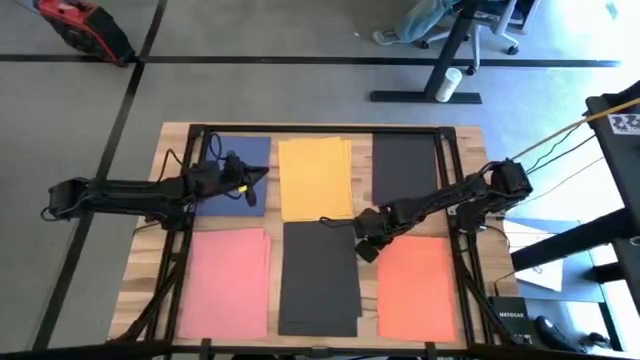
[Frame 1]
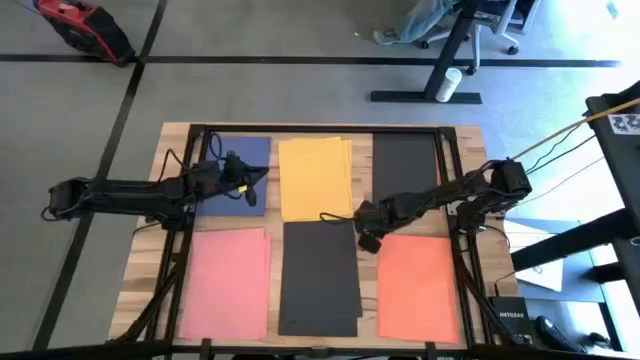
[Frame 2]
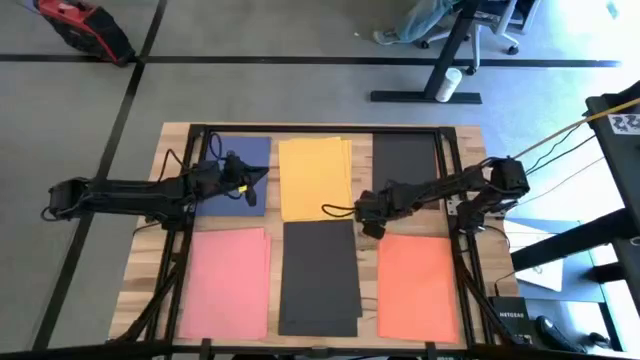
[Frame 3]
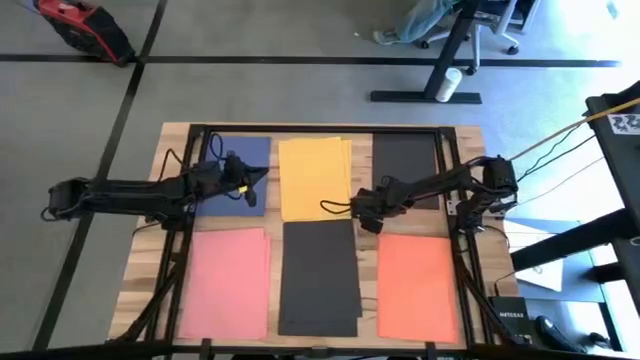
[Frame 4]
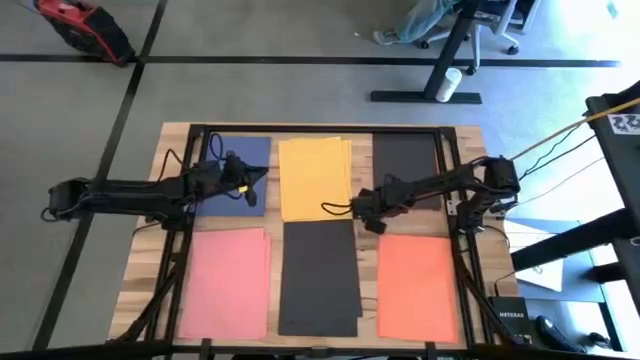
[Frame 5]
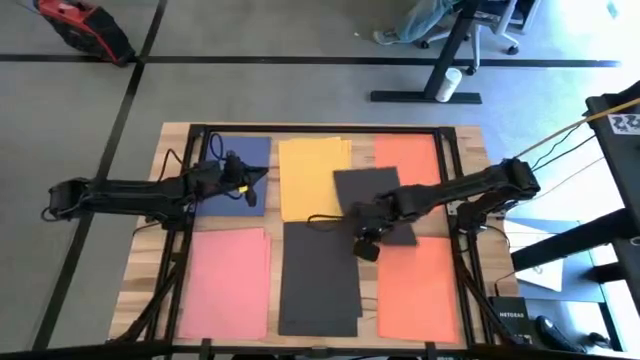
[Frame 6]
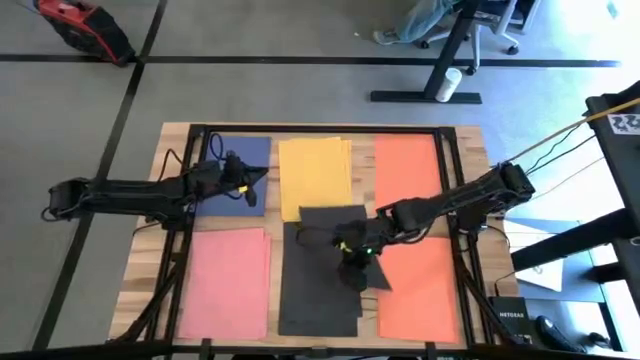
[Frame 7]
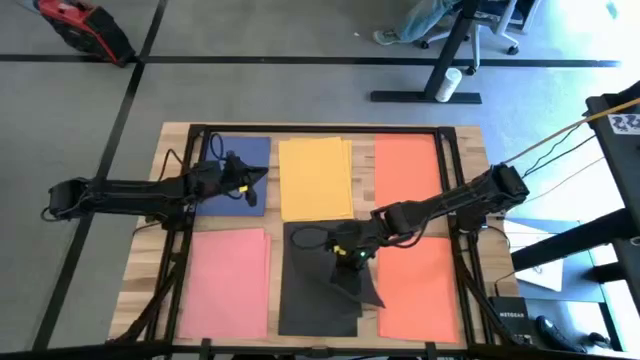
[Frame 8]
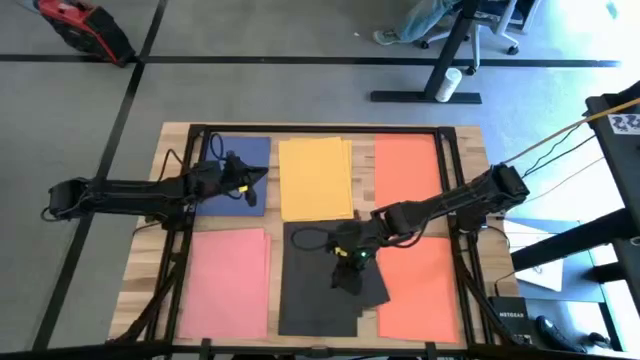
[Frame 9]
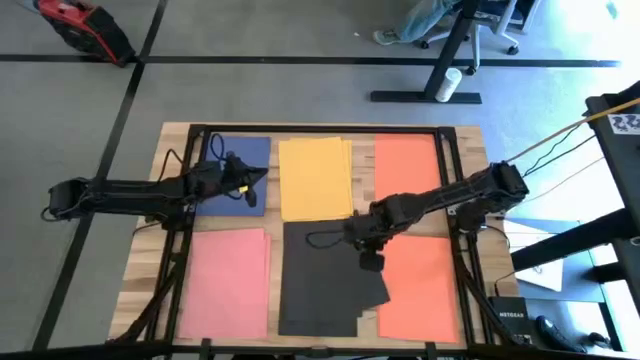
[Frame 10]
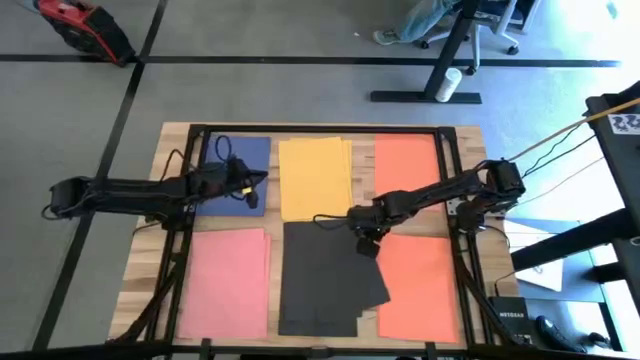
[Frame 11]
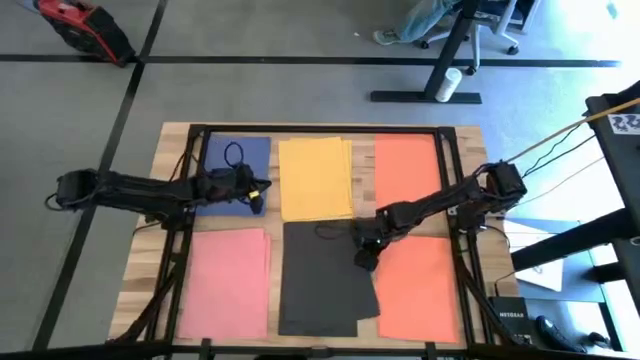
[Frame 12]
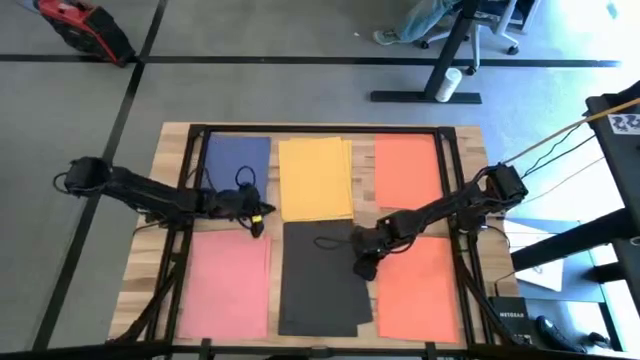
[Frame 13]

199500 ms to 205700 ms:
Task: Organize paper
Stack the black paper on top of the other black paper

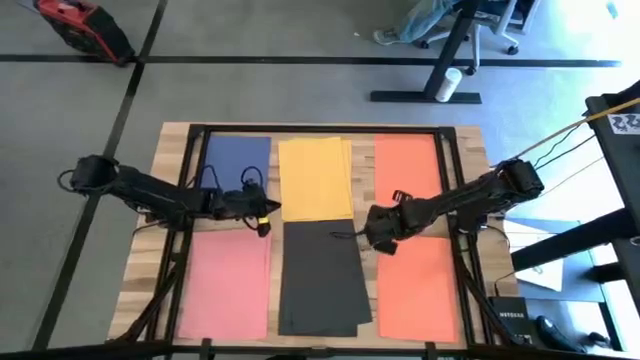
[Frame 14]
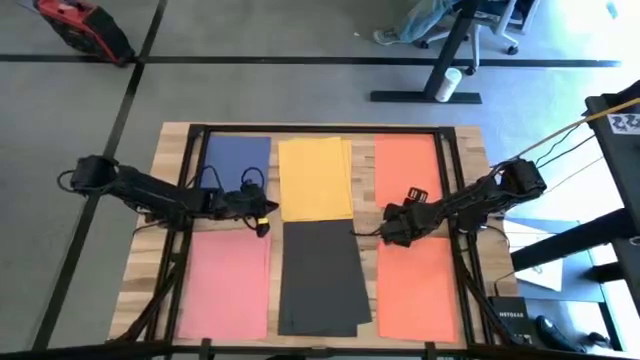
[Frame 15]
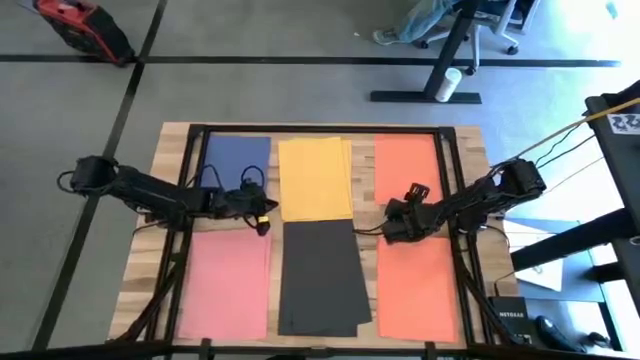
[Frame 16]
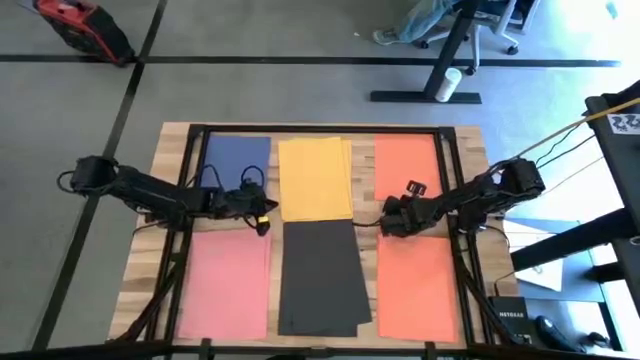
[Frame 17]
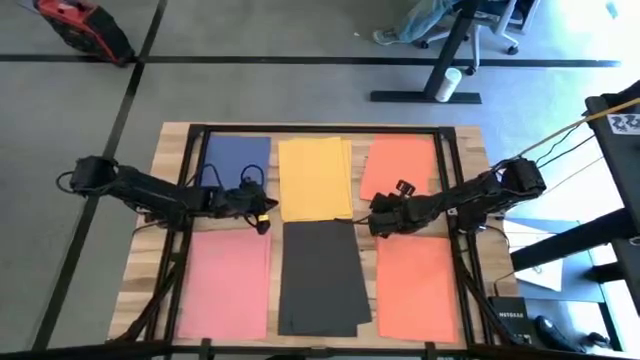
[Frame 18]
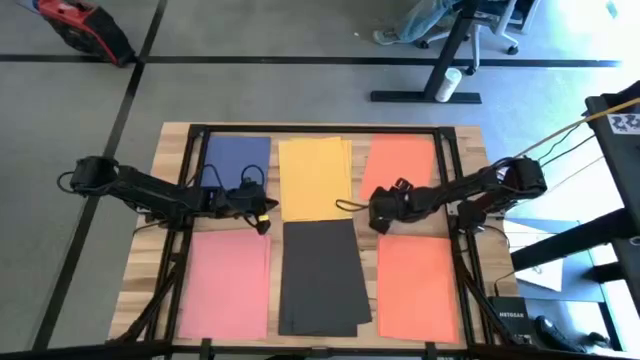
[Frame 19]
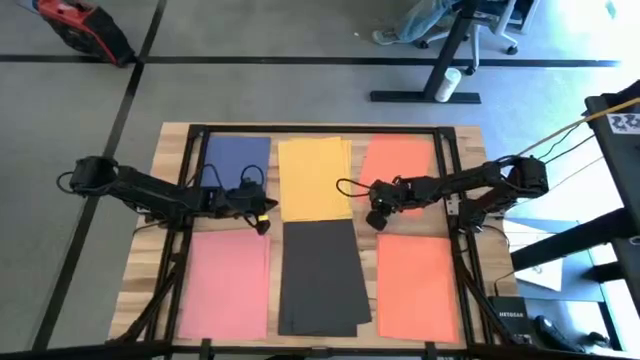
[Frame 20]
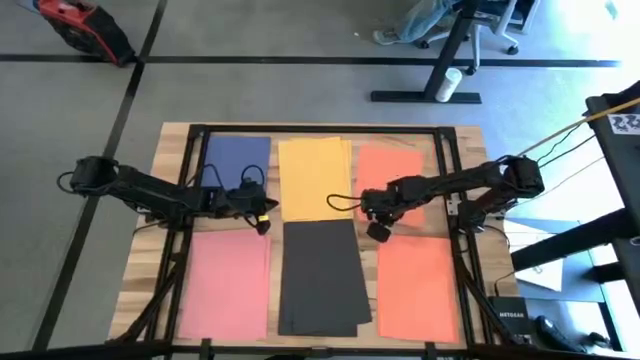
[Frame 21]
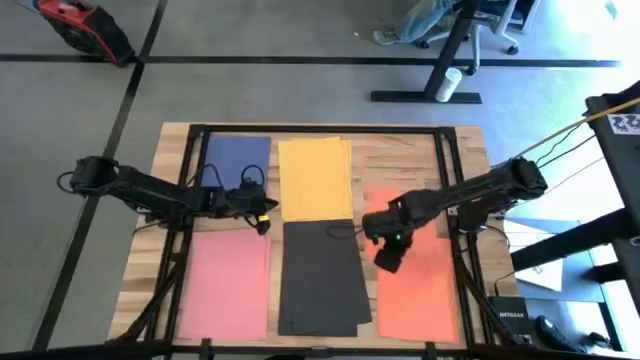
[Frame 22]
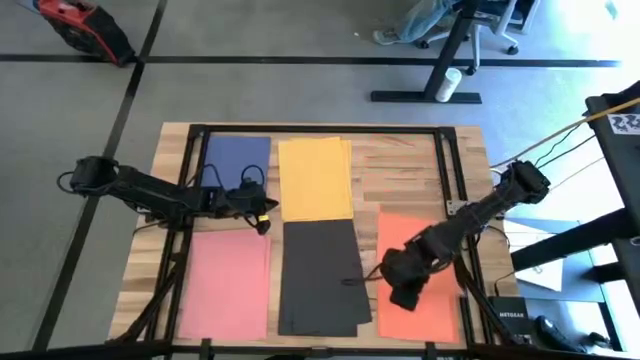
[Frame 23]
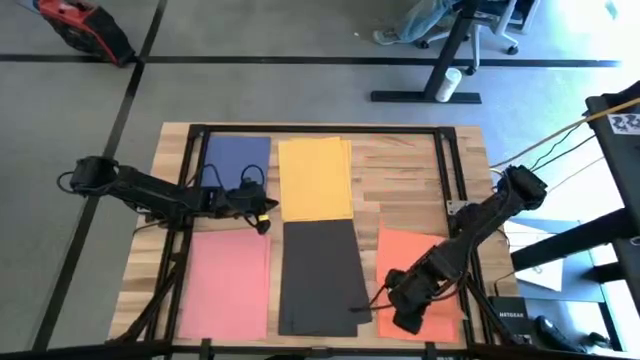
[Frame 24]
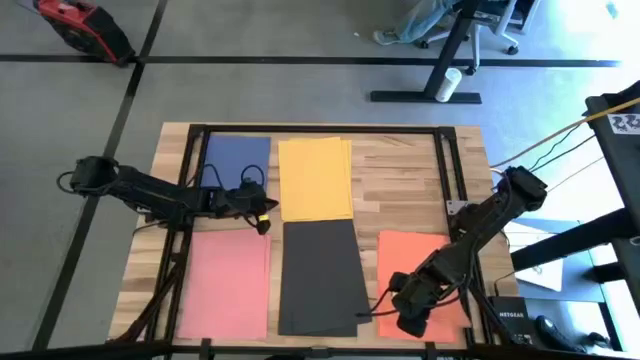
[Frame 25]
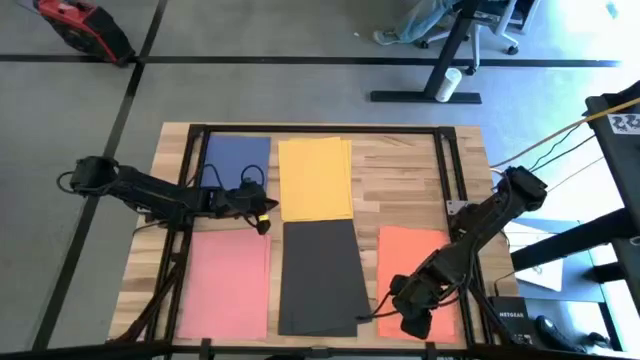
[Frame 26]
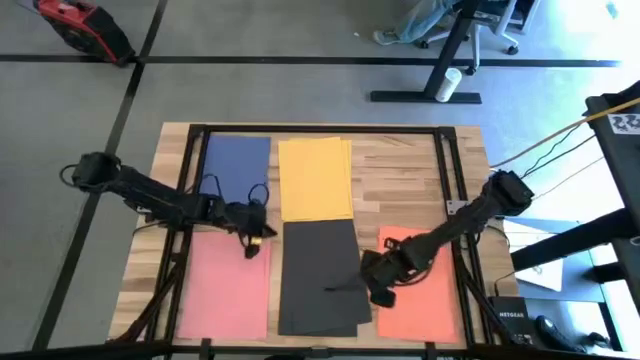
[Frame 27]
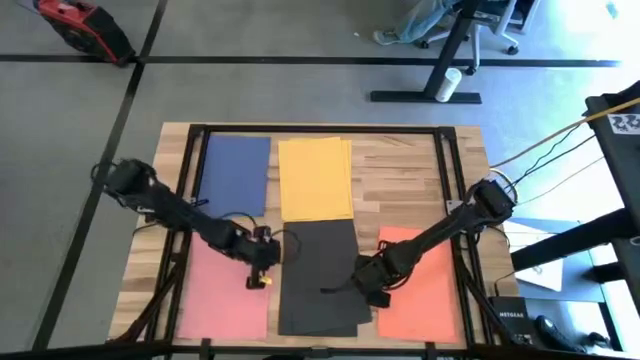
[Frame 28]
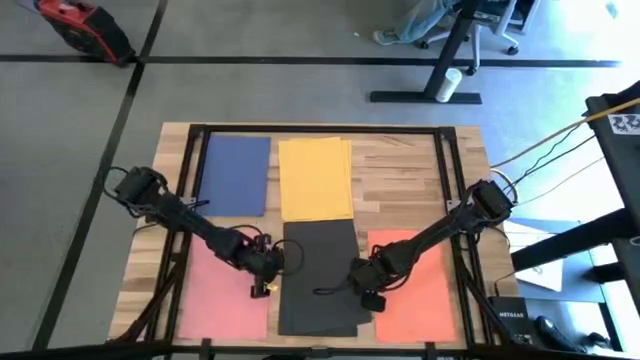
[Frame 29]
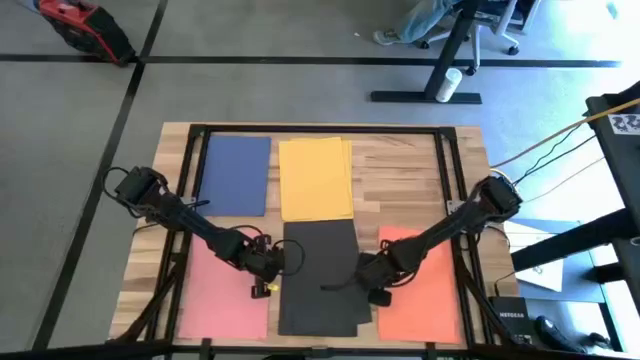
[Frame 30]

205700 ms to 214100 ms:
Stack the orange paper on top of the other orange paper

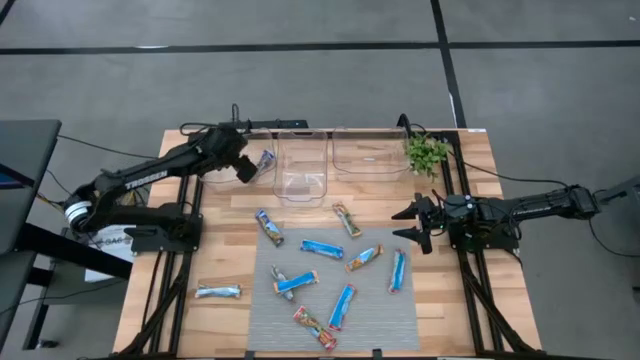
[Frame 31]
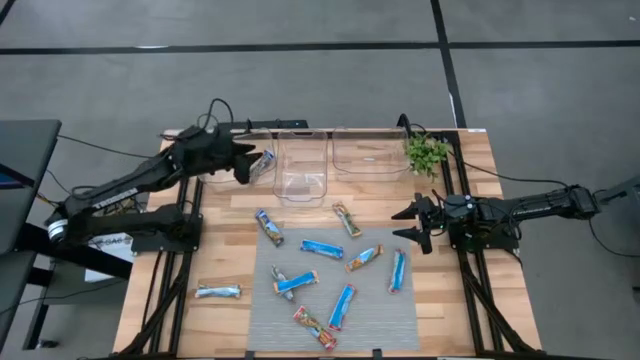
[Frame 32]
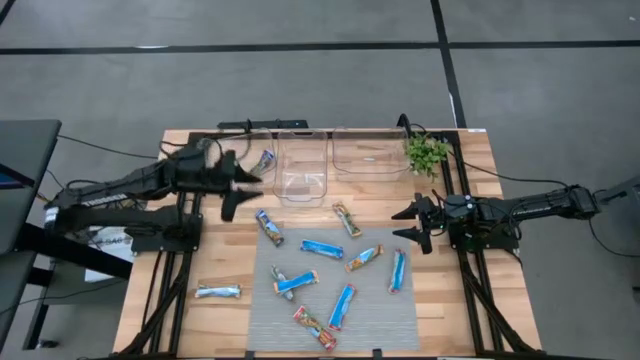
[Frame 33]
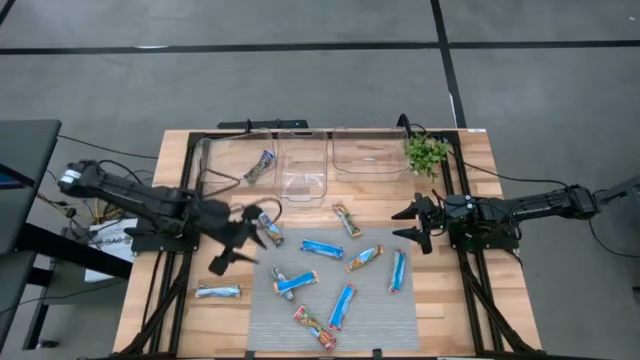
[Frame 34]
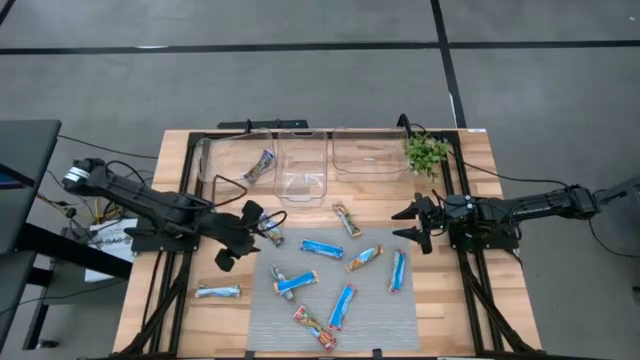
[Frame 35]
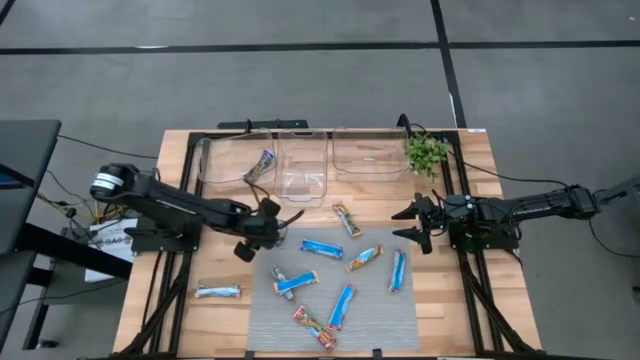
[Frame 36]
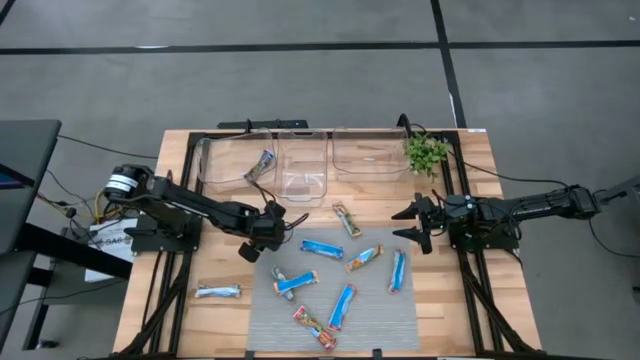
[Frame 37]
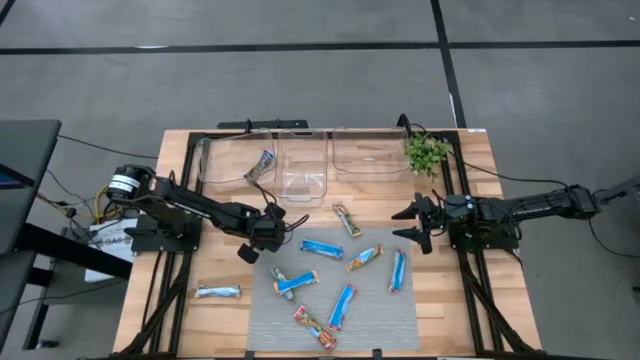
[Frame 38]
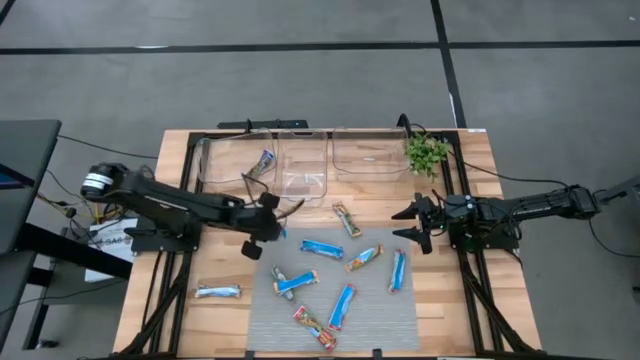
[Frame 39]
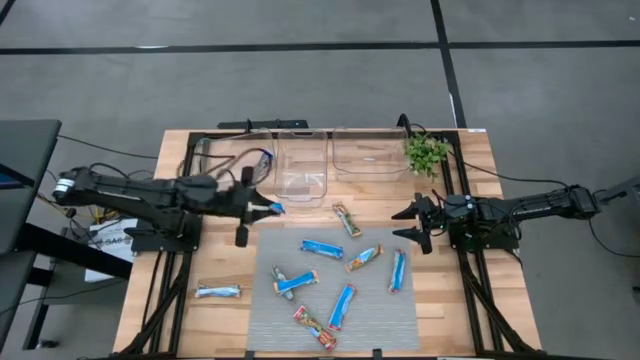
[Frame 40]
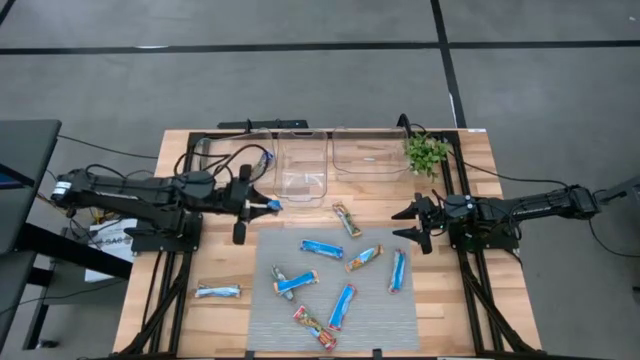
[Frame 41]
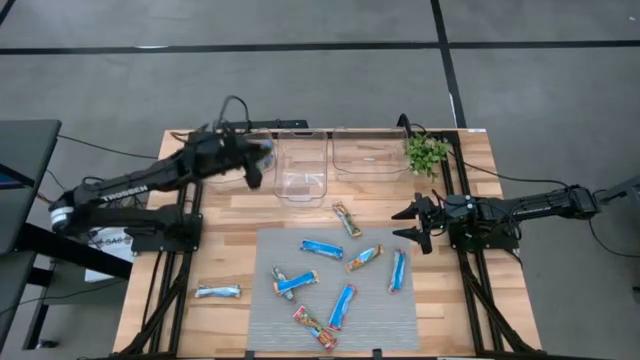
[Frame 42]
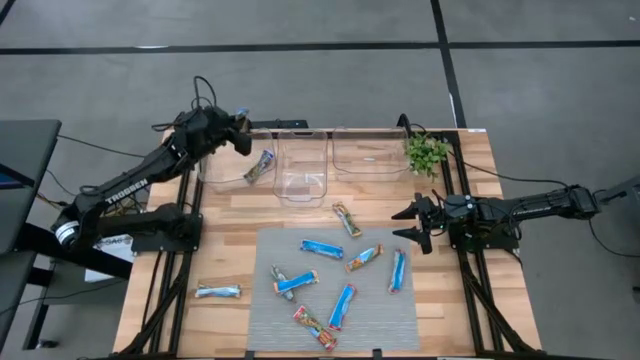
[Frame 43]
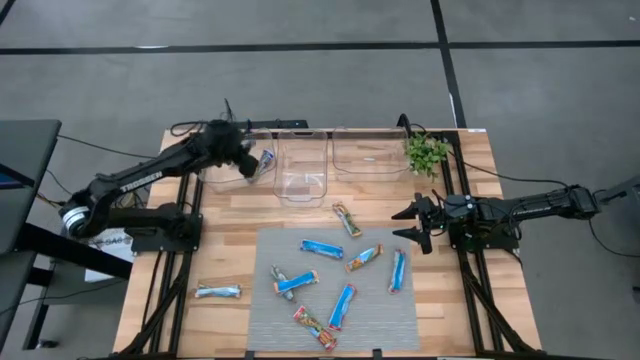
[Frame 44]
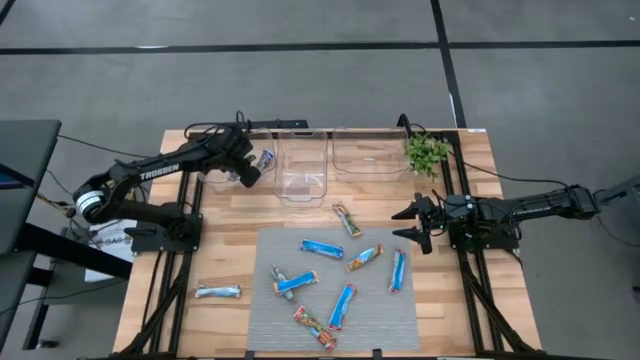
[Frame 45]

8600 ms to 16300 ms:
Task: Pick and place Granola Bars by type
Put the blue granola bar into the left transparent bin
